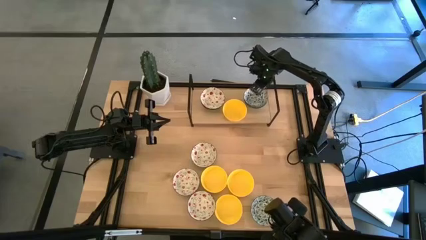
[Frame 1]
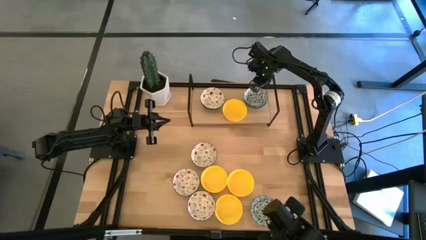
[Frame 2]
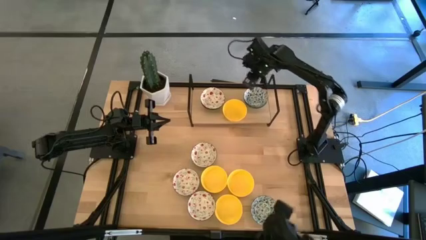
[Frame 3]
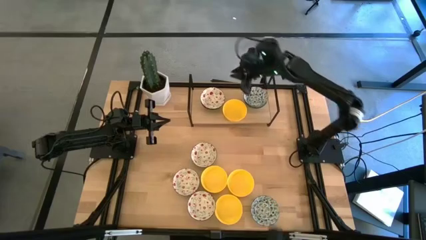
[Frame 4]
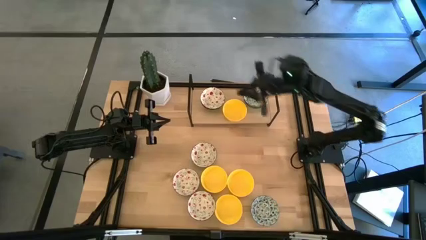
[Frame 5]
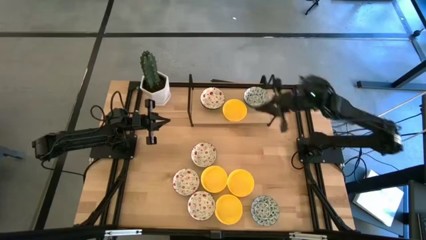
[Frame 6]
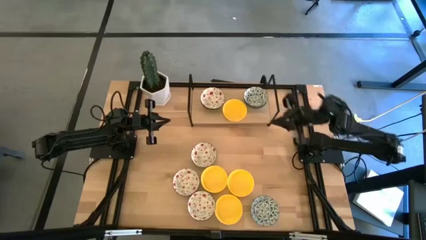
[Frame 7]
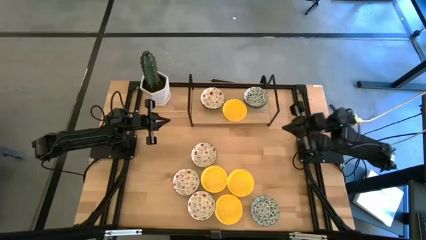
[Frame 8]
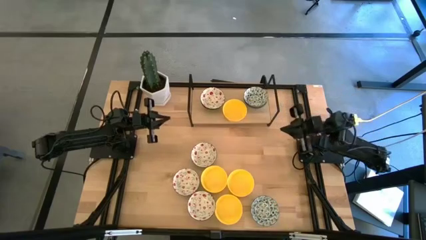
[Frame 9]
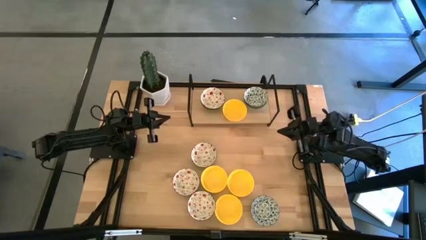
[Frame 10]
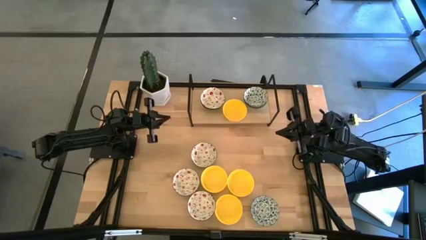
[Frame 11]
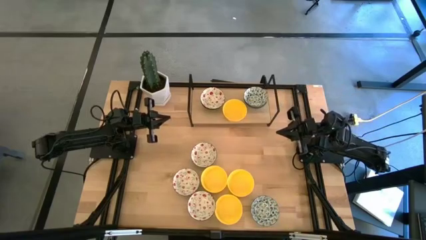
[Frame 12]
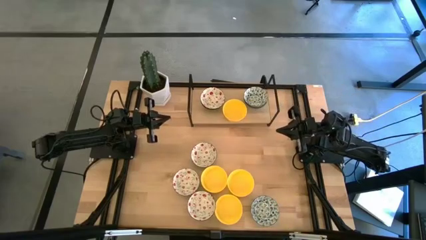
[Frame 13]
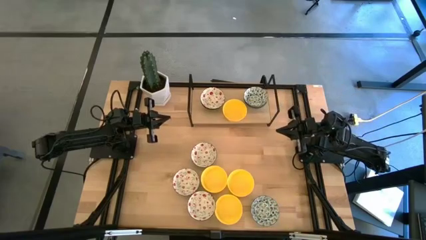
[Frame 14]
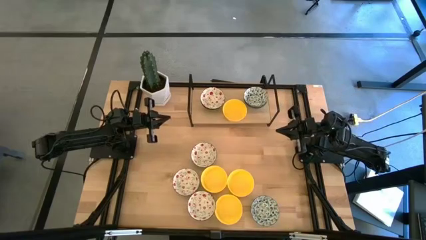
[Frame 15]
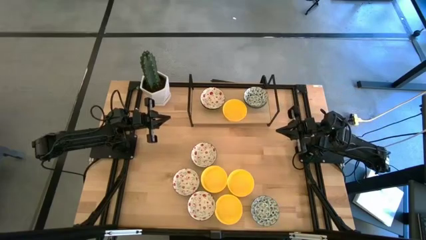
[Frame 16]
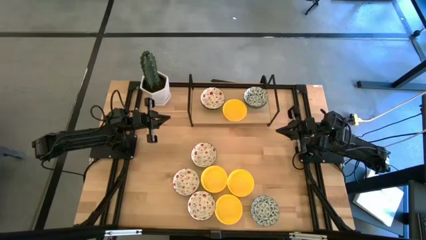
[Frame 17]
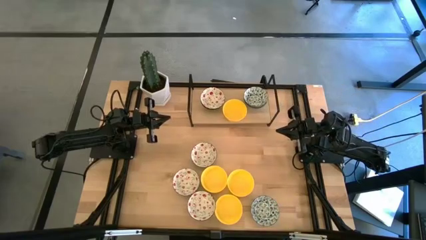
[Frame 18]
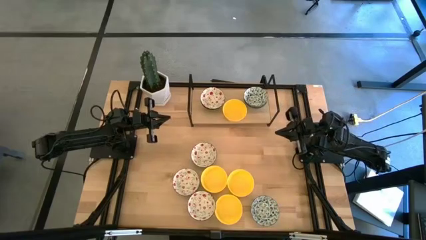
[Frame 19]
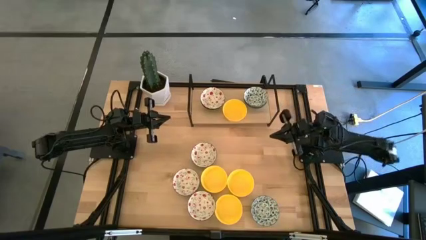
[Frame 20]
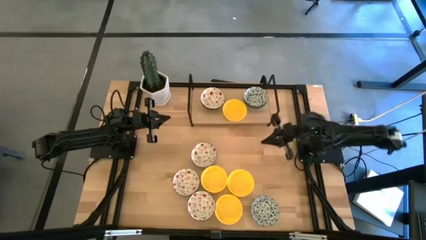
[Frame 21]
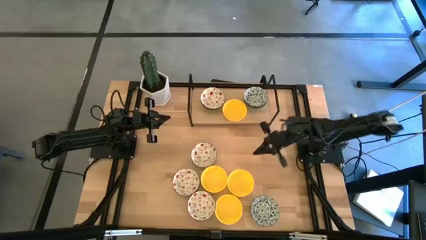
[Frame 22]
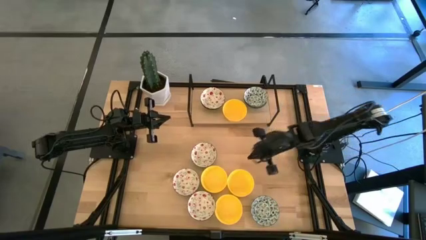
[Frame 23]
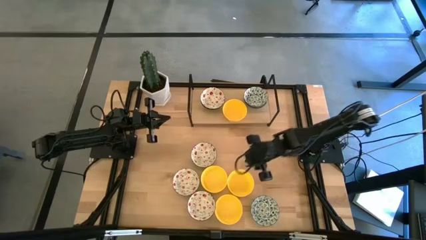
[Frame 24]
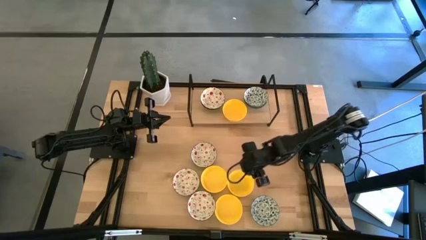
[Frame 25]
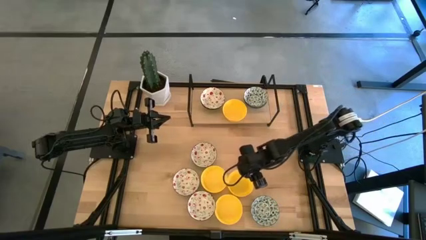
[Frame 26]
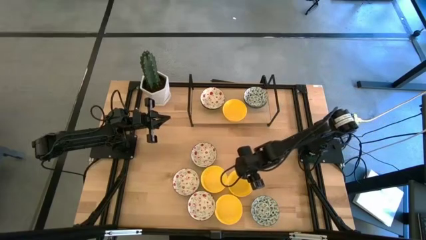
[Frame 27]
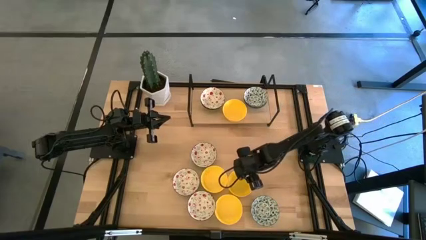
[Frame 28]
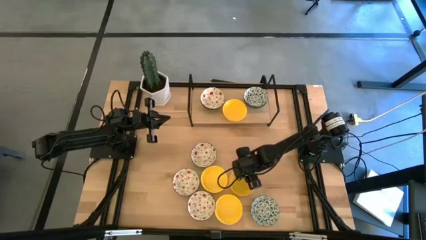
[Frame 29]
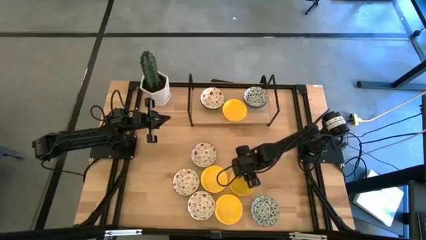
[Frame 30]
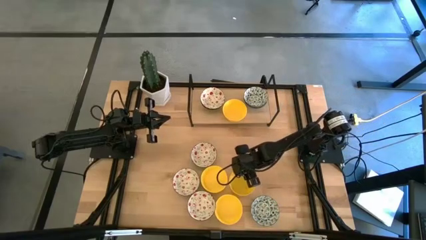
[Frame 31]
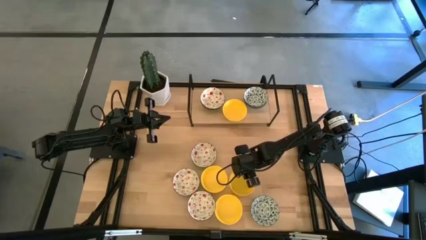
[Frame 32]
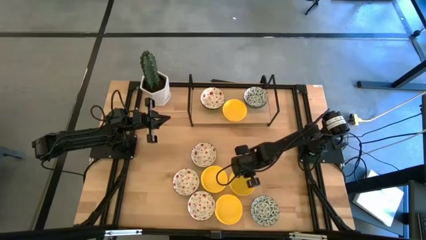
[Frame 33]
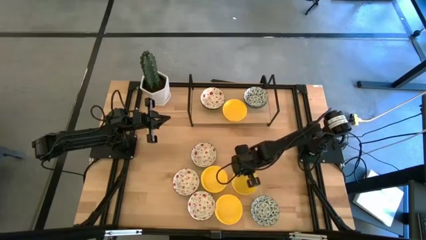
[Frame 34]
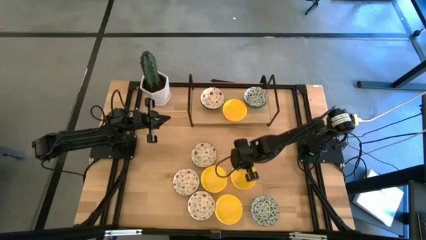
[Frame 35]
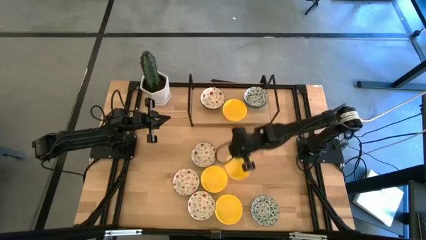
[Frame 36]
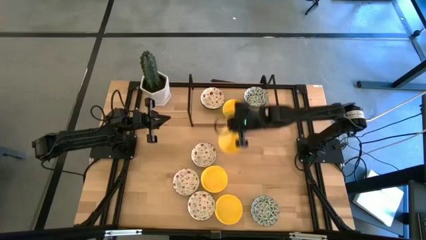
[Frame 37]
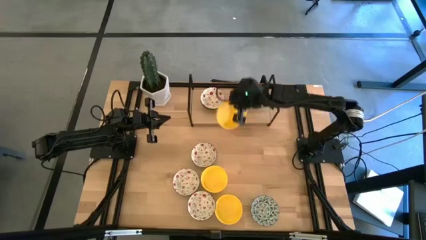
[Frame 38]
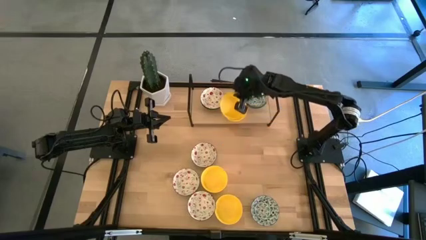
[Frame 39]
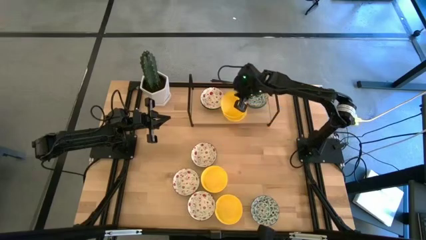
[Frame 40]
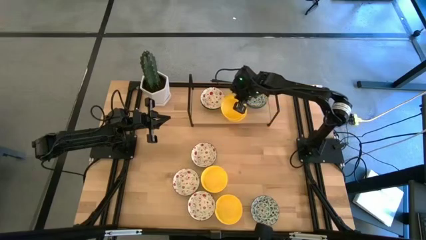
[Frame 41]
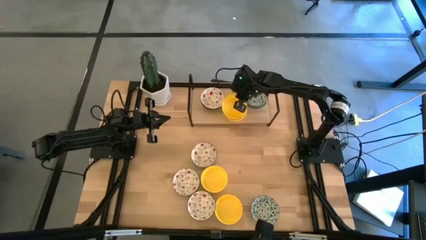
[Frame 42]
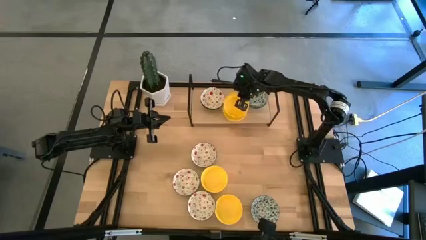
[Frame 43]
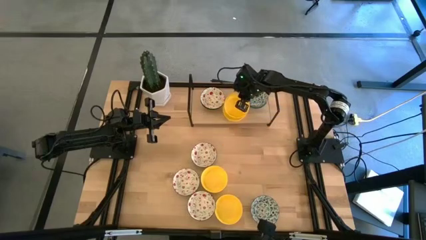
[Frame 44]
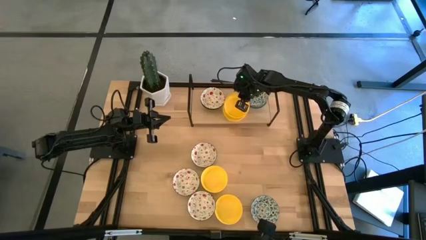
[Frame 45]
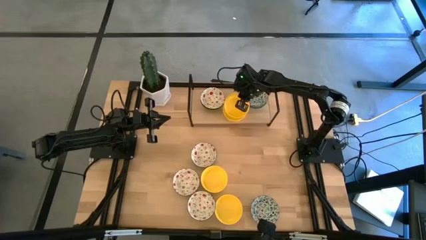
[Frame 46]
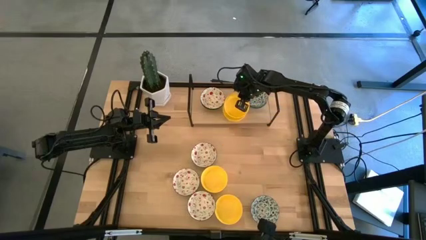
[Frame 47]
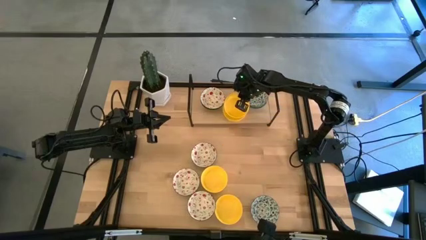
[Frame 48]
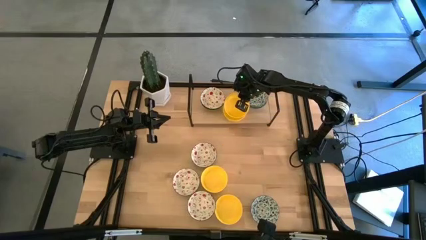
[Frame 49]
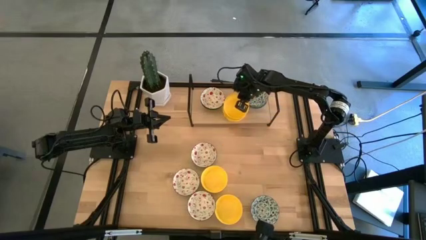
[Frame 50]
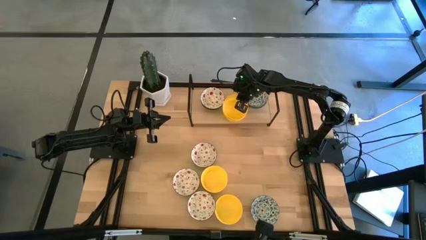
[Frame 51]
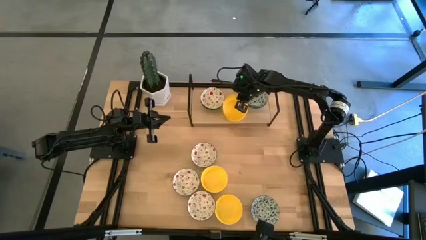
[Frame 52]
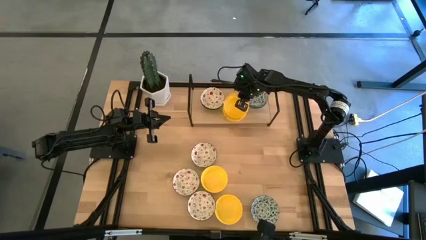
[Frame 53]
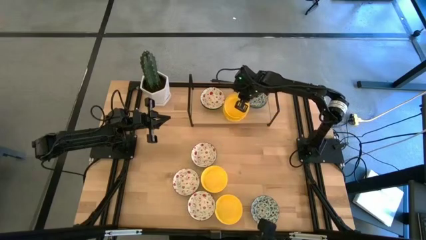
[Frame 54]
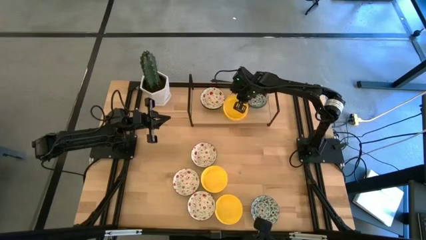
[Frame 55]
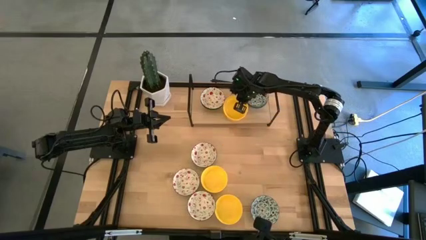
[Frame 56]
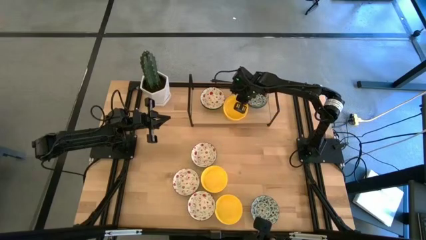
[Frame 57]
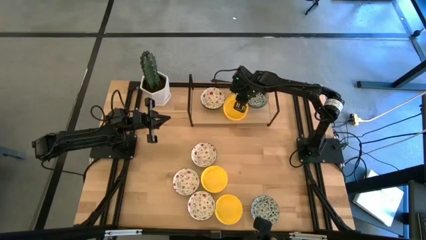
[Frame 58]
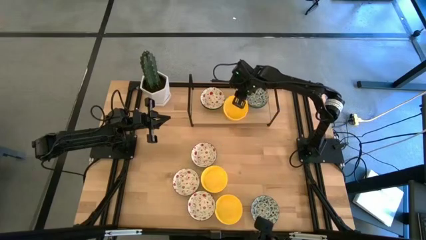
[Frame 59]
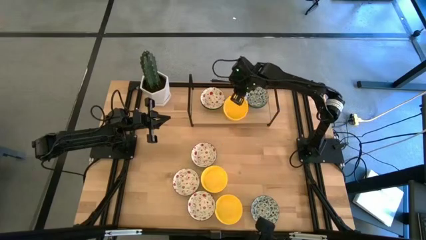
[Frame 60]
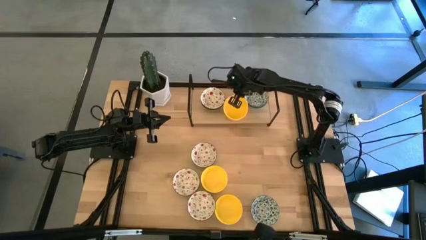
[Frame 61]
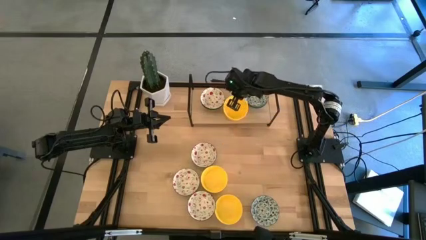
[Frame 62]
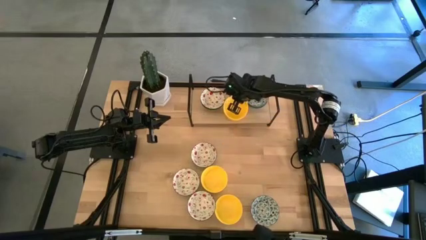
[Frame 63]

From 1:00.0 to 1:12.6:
Task: Pick & Place Mini bowls
Stack the yellow bowl on top of the yellow bowl on the shelf
